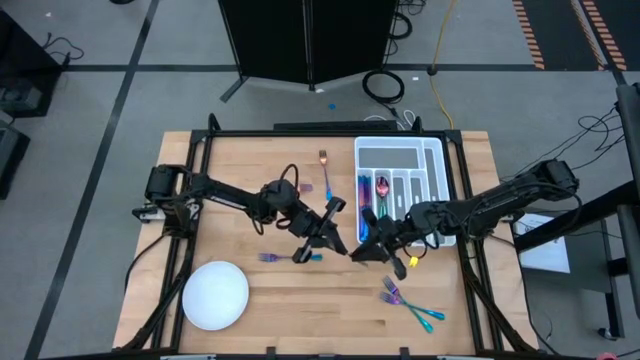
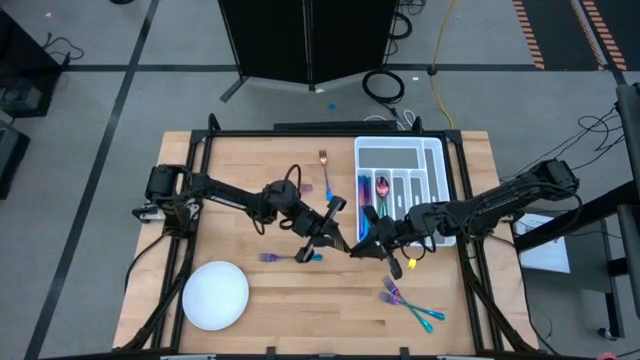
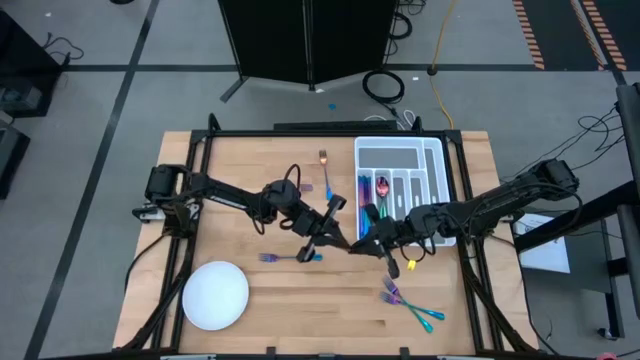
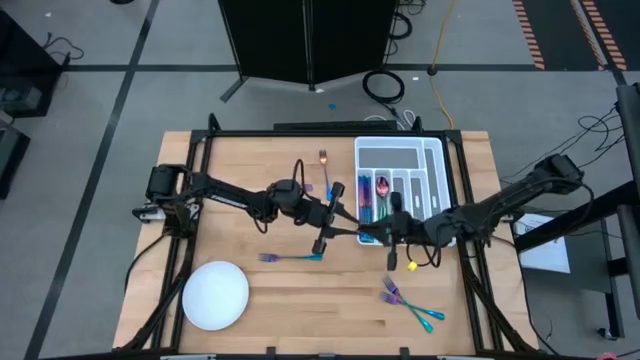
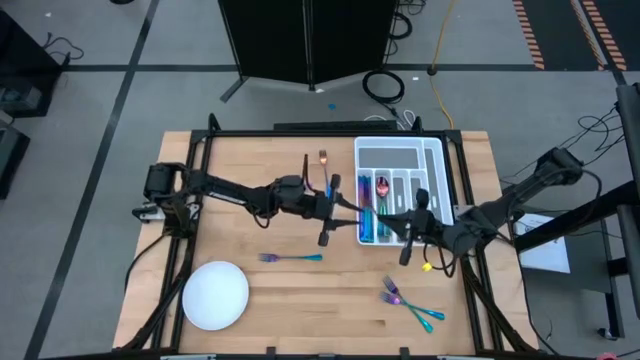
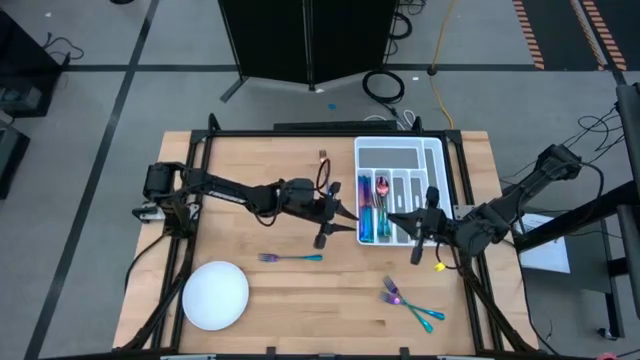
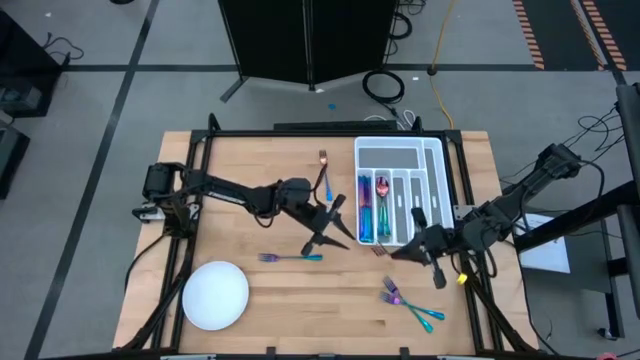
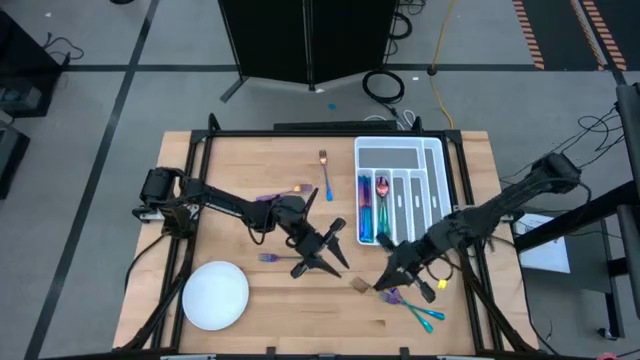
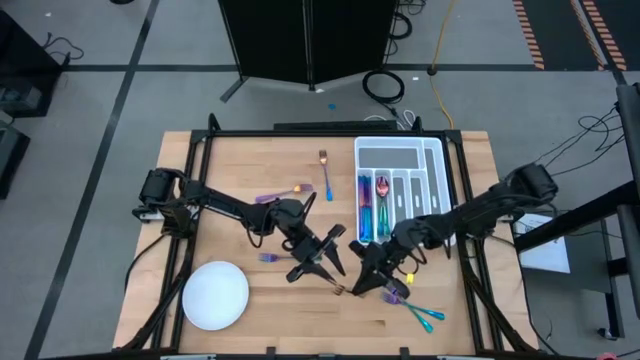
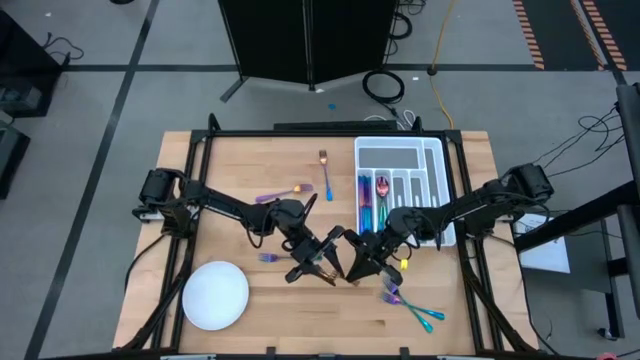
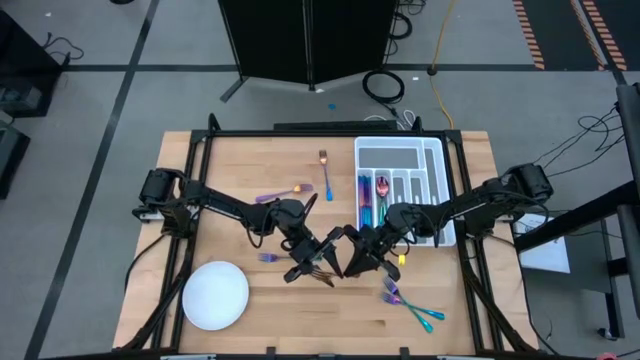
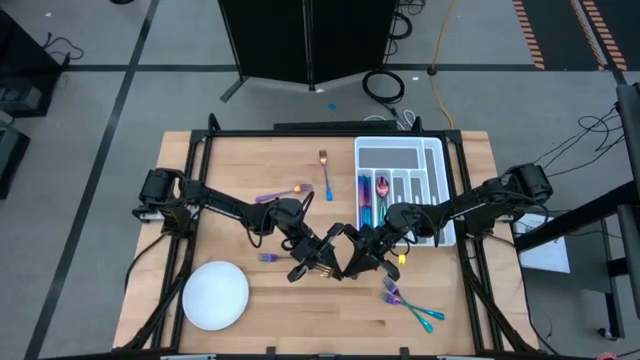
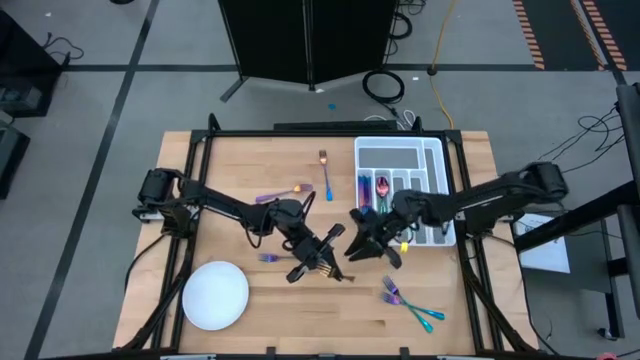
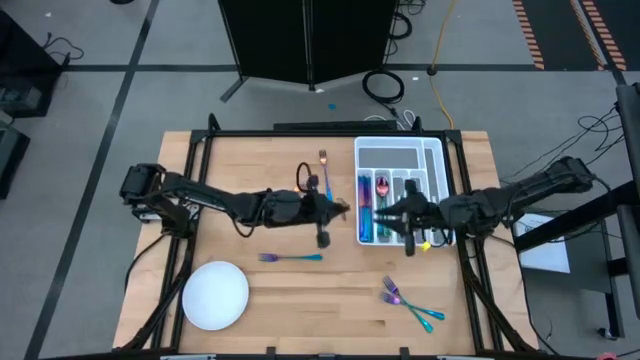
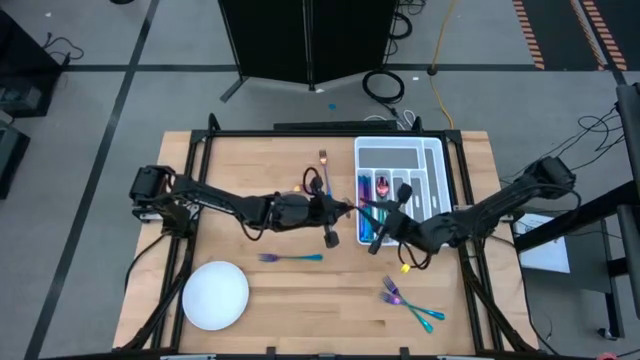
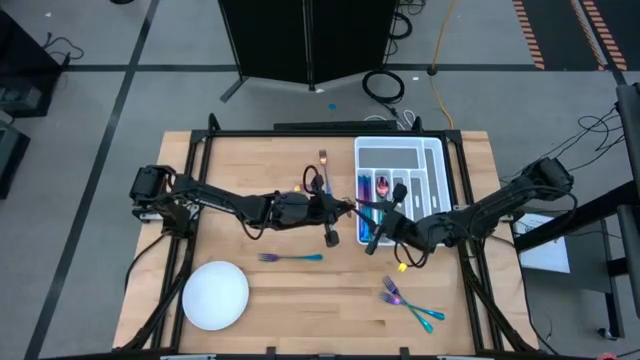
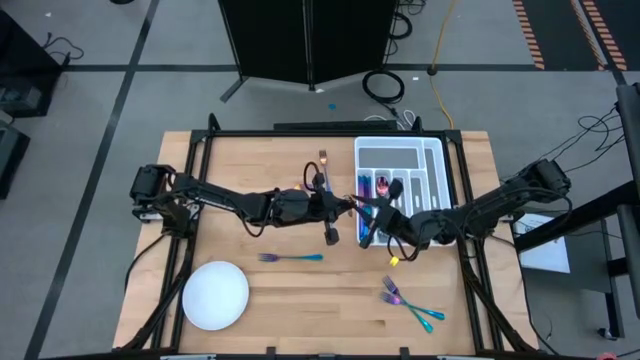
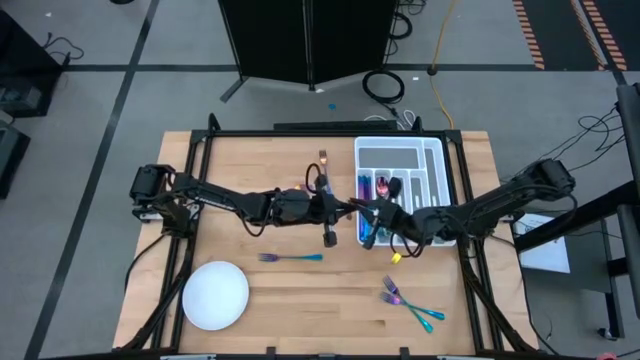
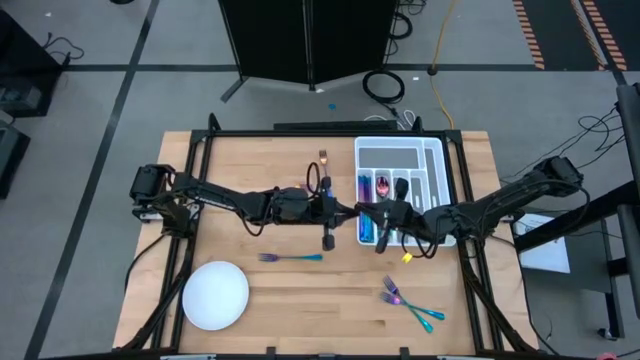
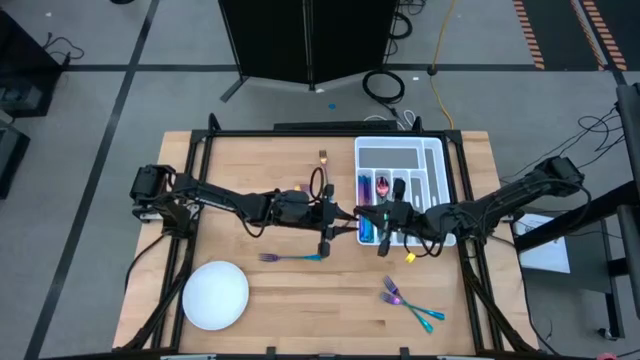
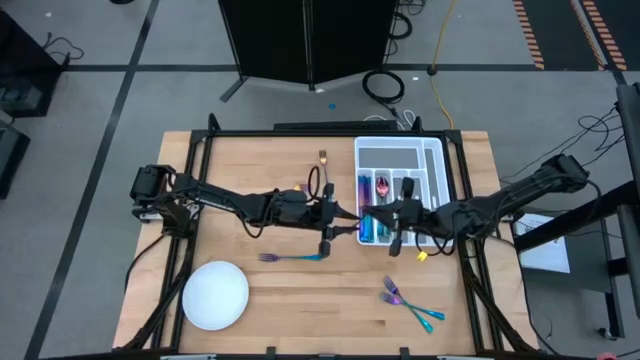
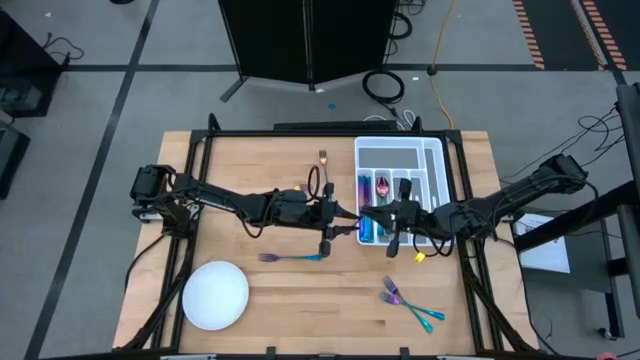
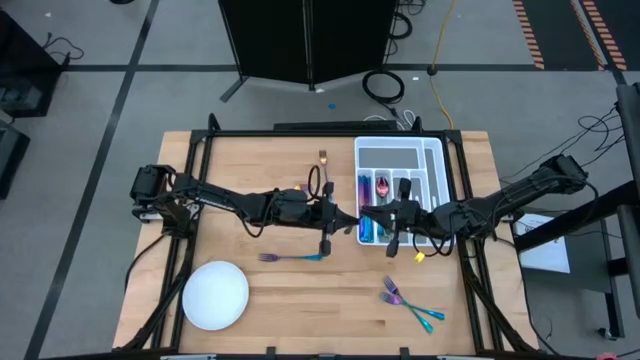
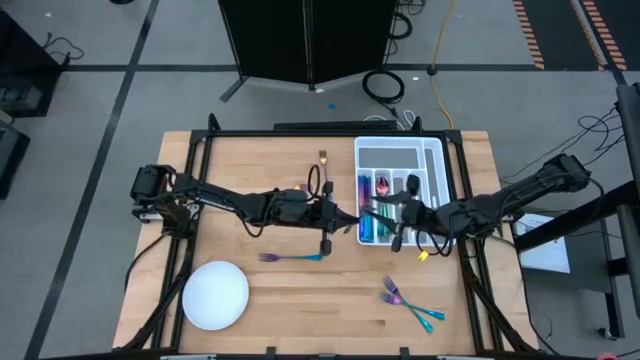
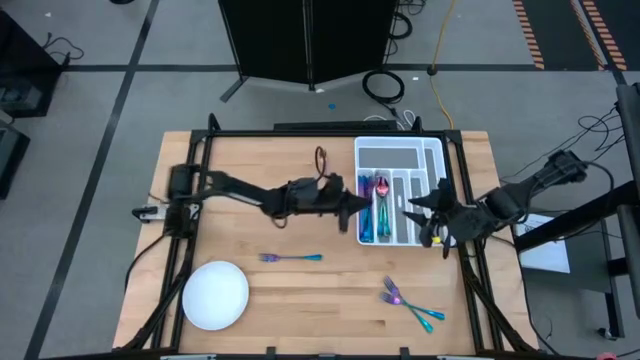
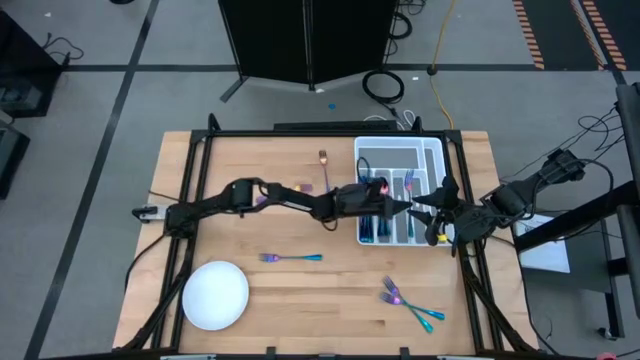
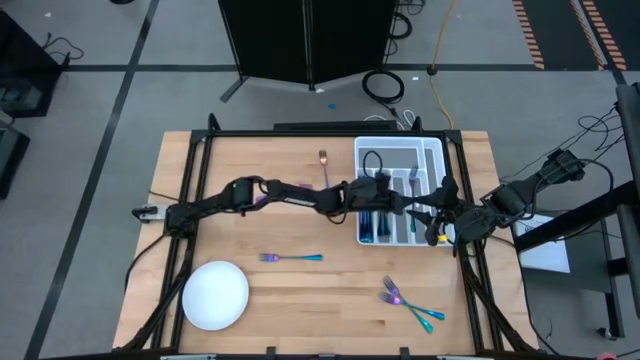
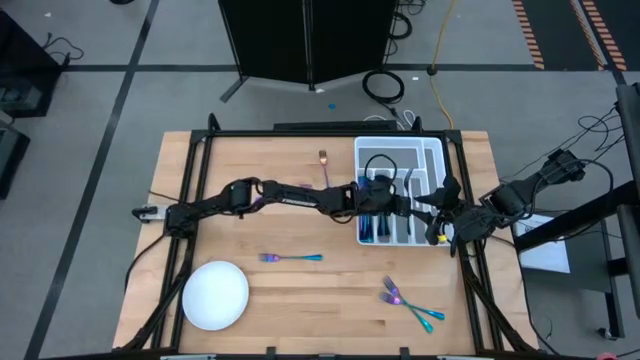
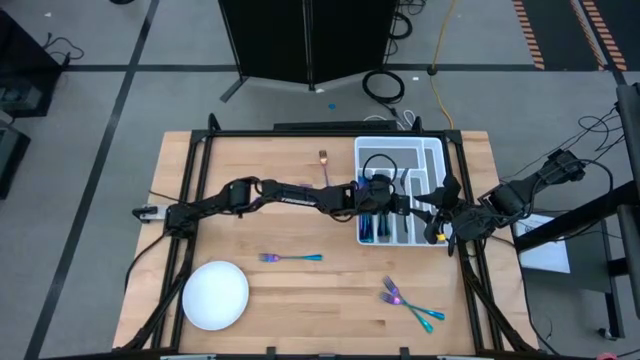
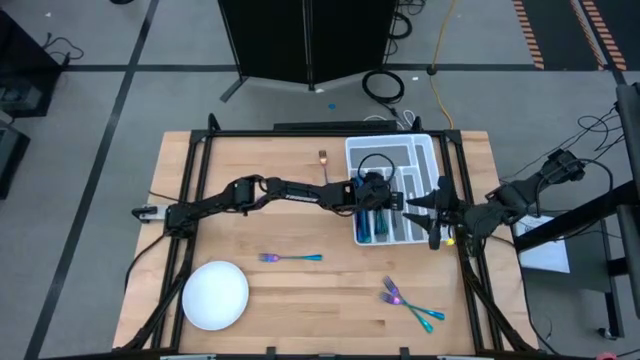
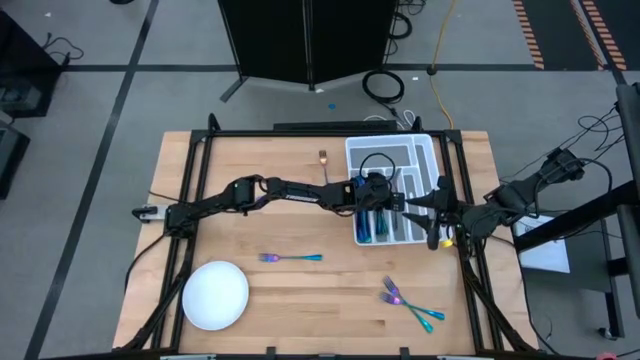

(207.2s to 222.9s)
Task: Sort silverware
Put the blue fork into the utensil organizer

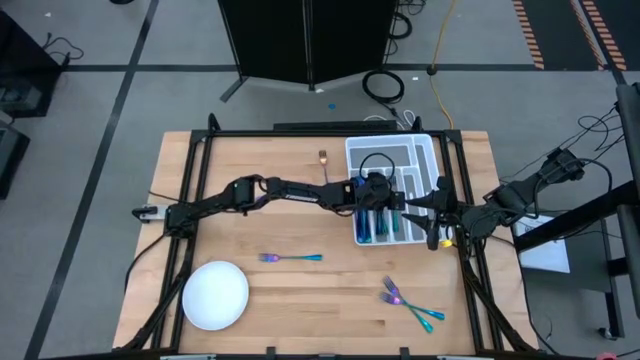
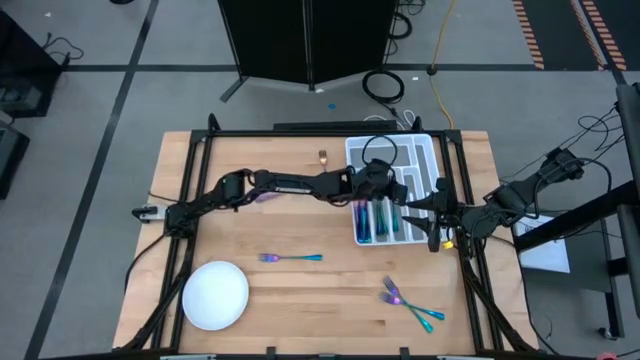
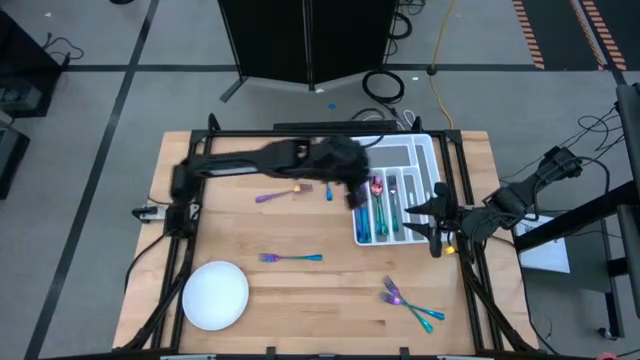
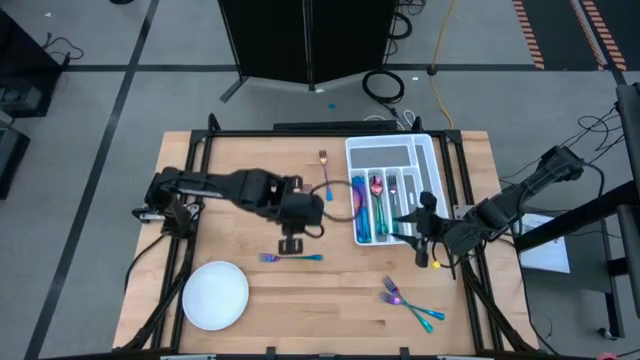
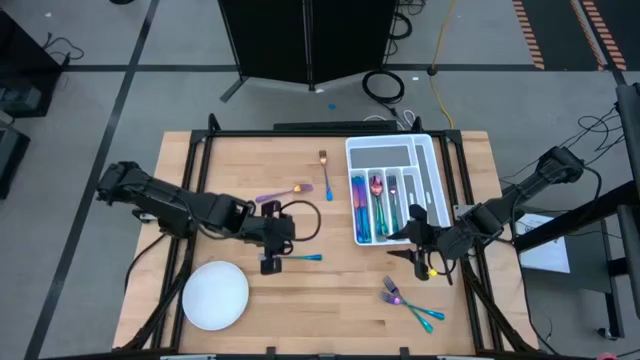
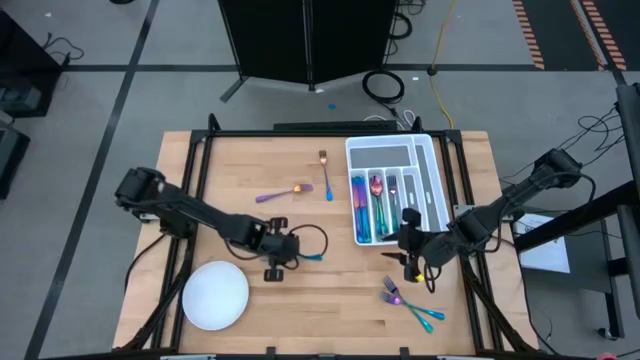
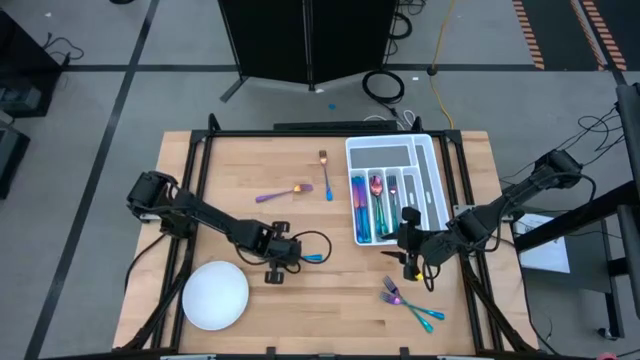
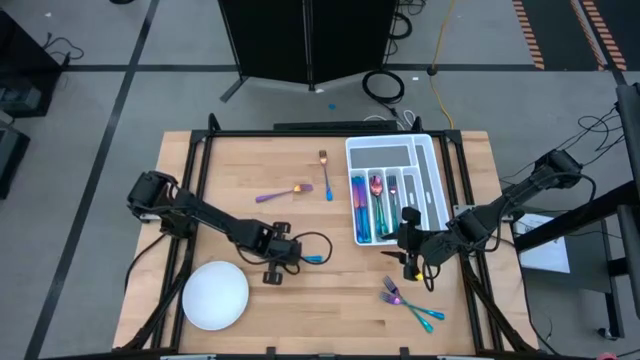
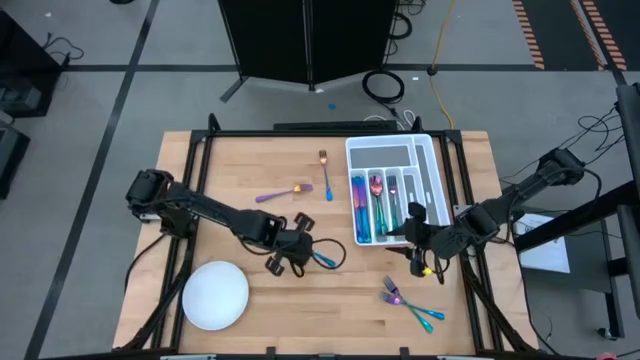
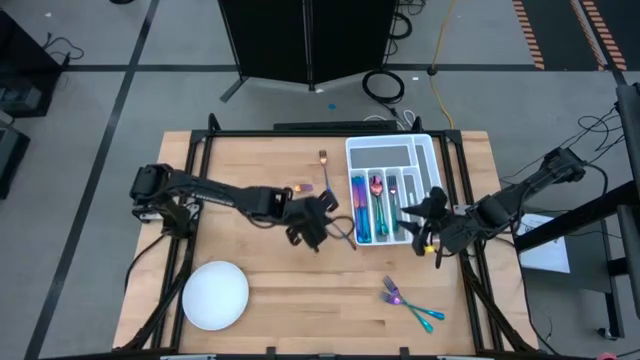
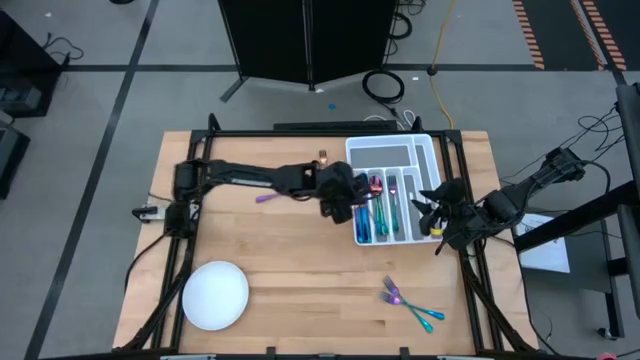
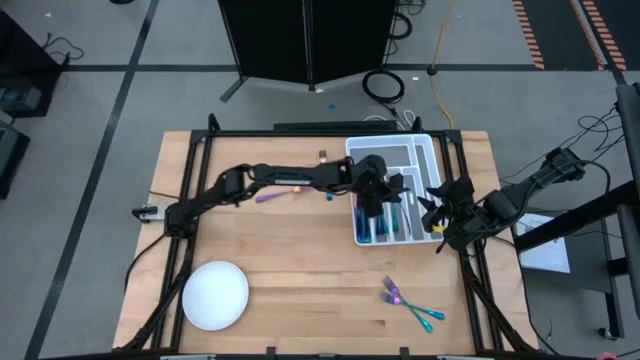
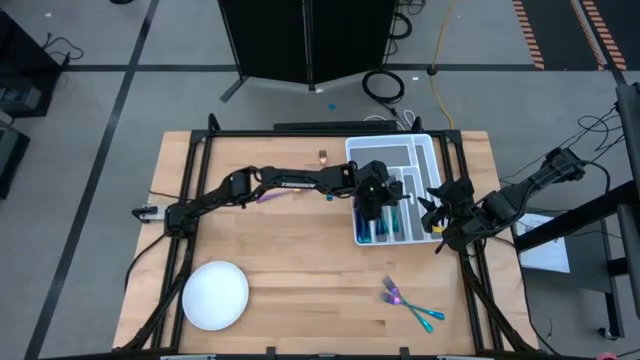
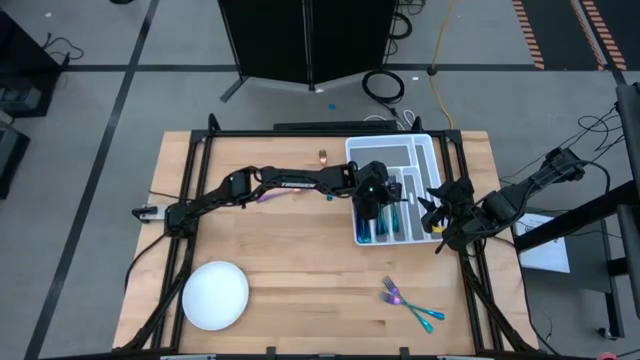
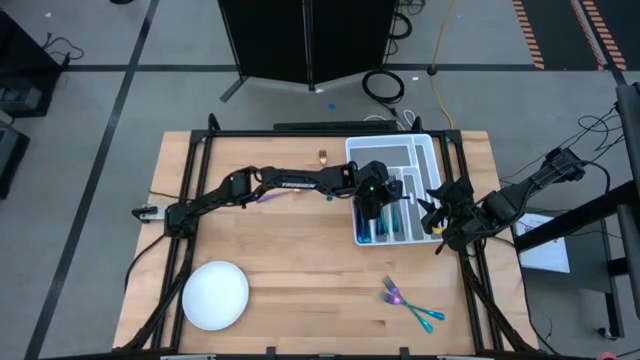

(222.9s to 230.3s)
Put the blue fork into the utensil organizer
